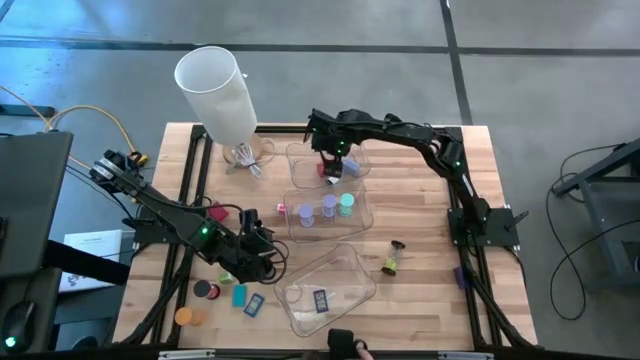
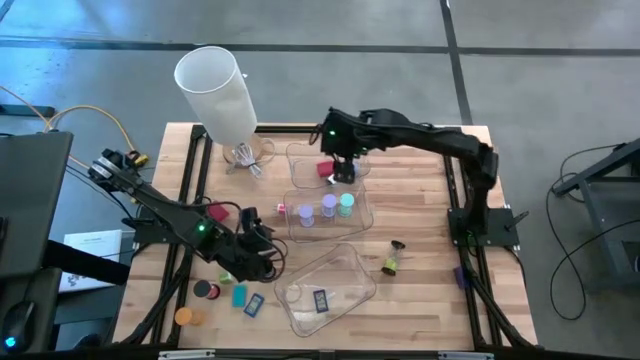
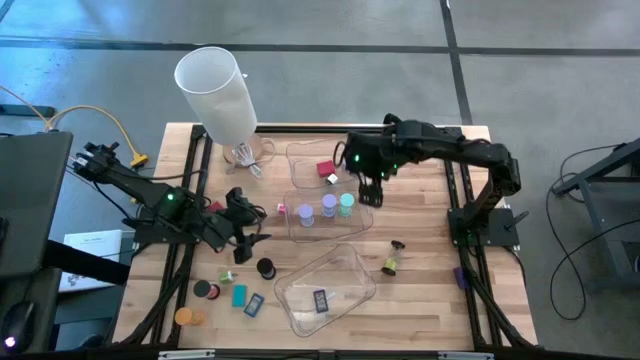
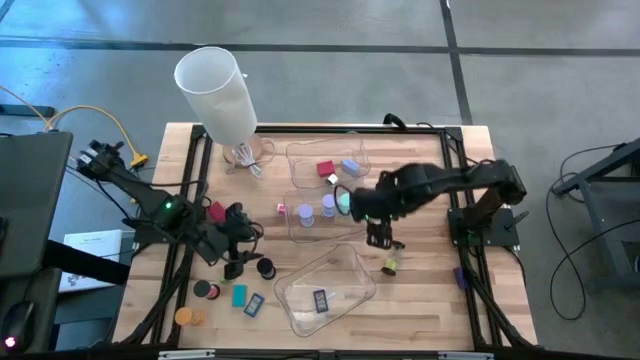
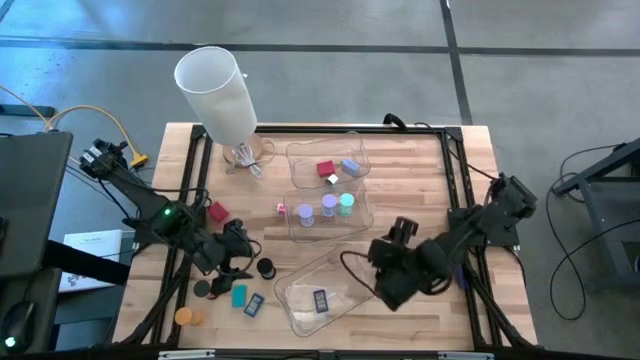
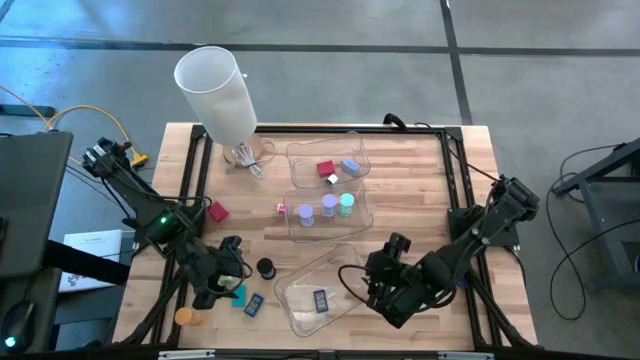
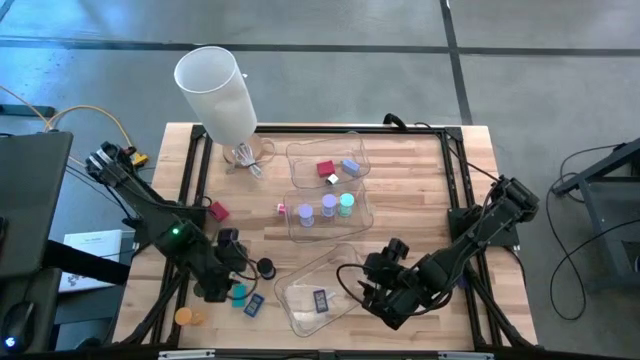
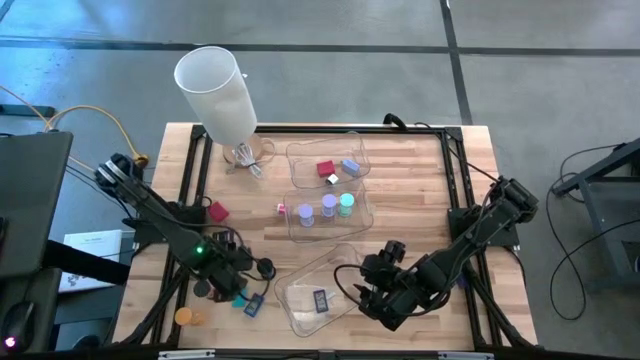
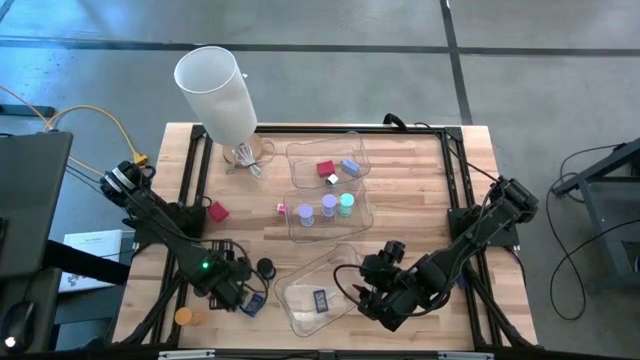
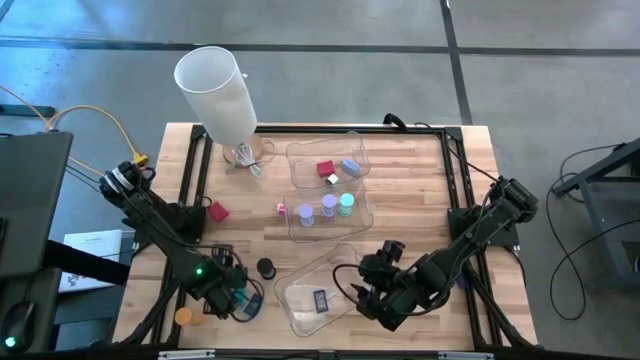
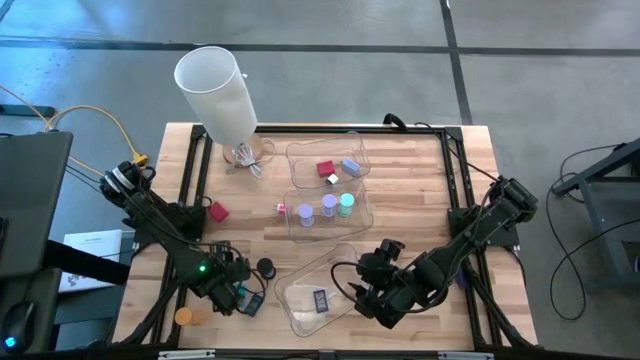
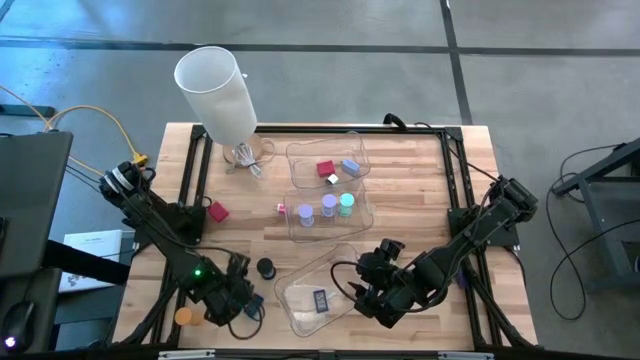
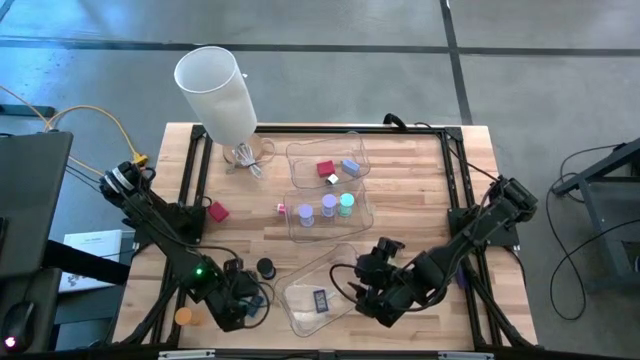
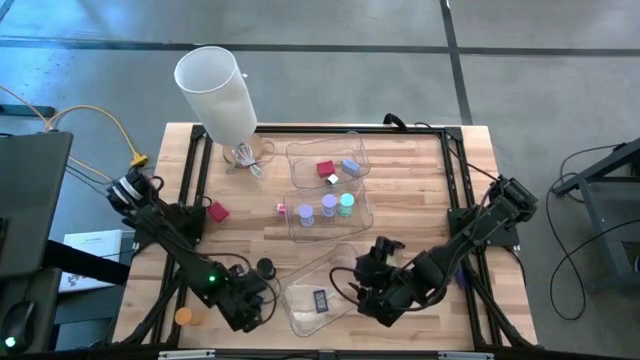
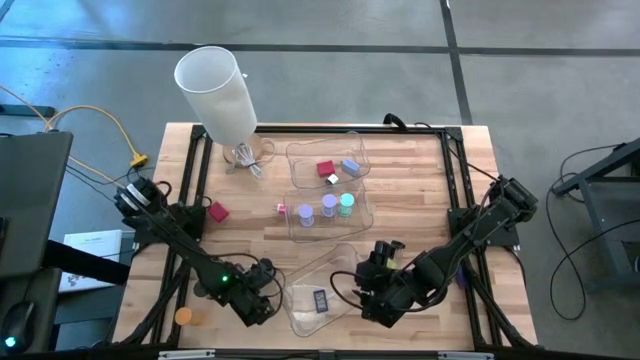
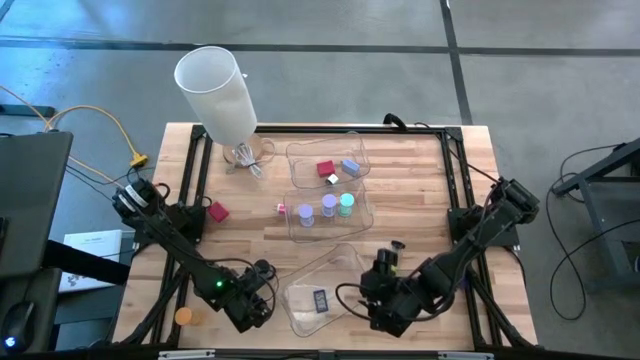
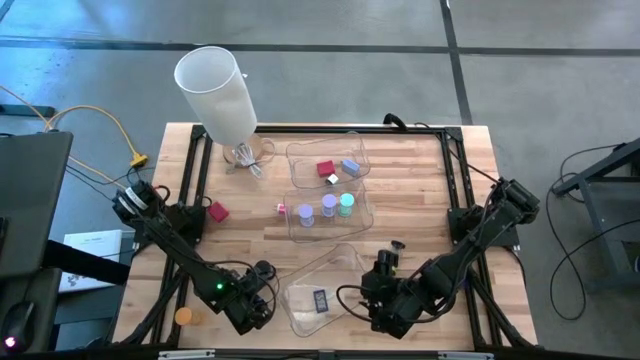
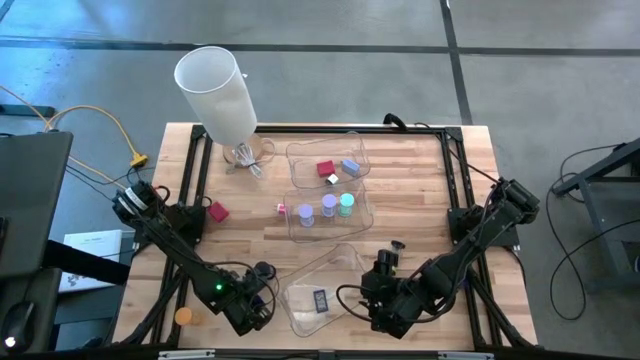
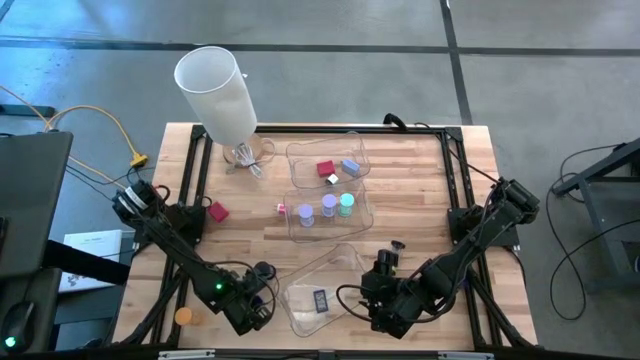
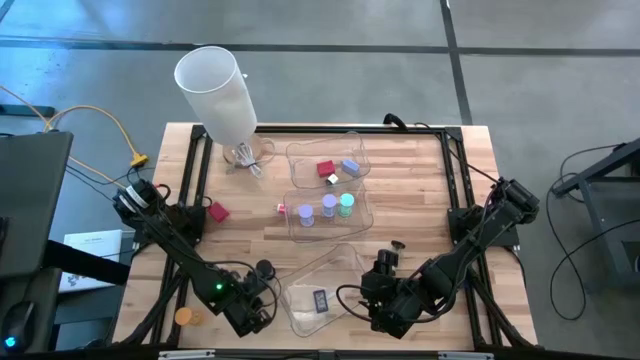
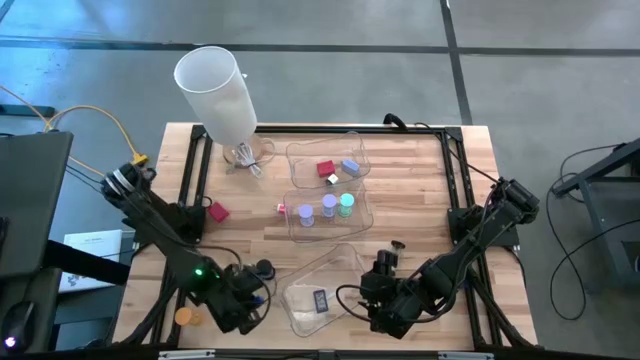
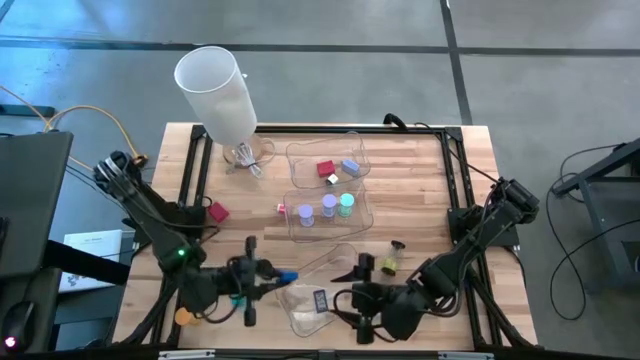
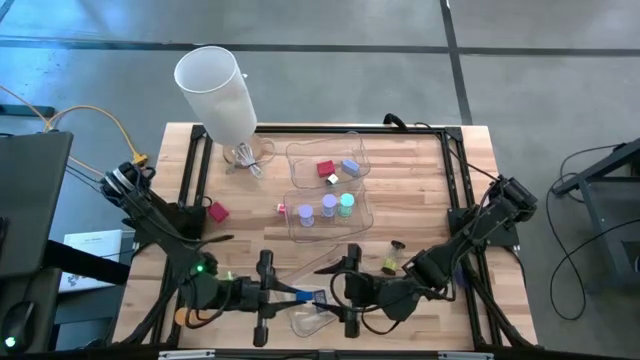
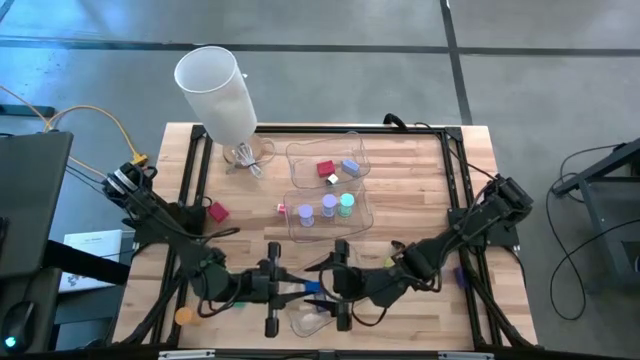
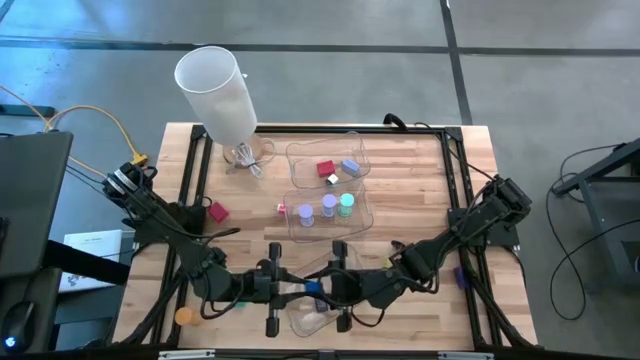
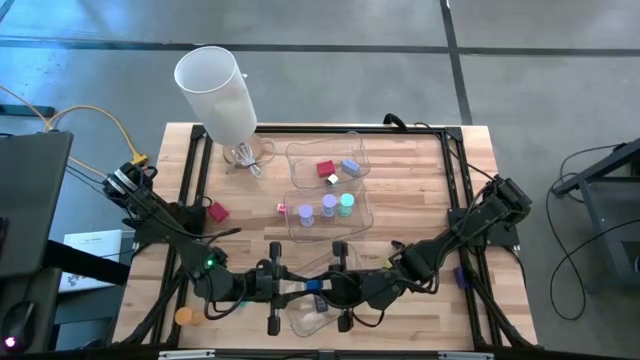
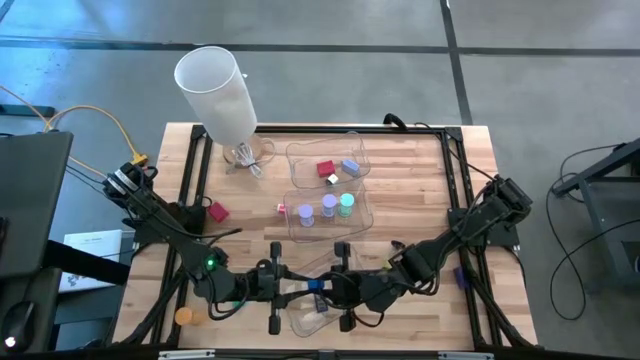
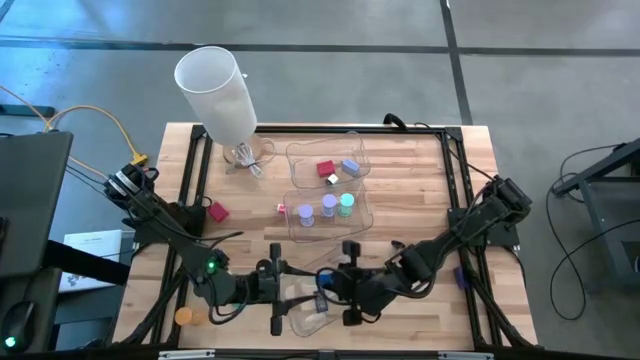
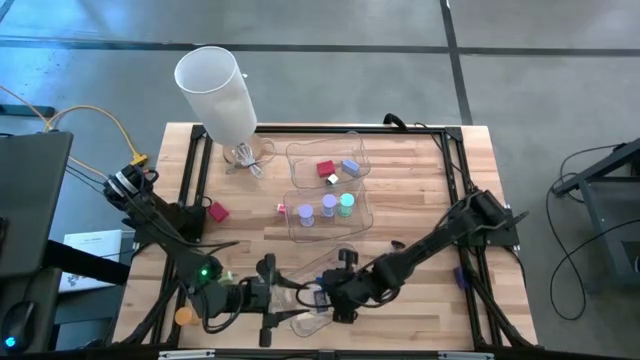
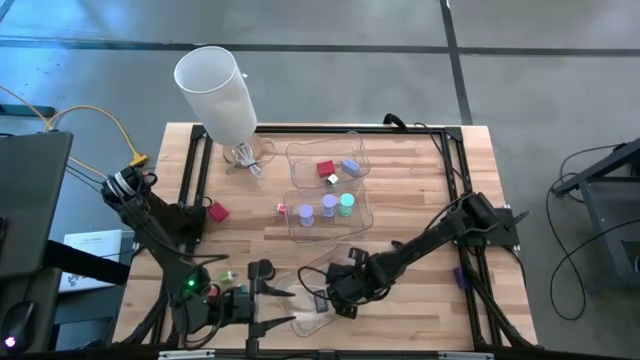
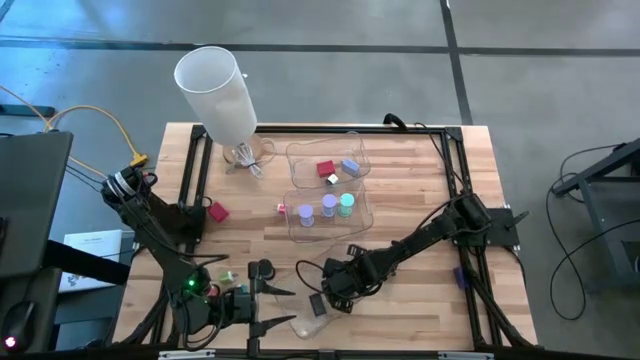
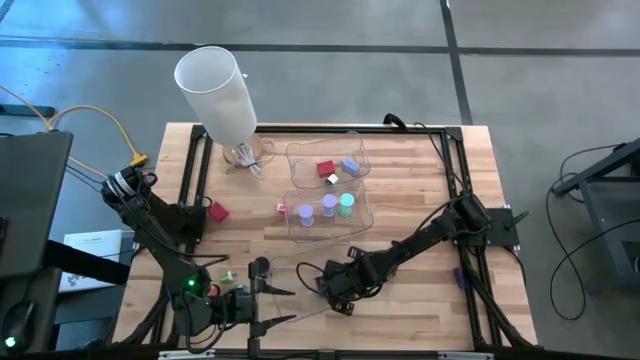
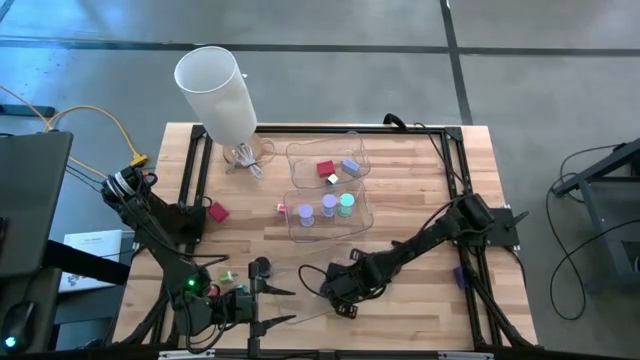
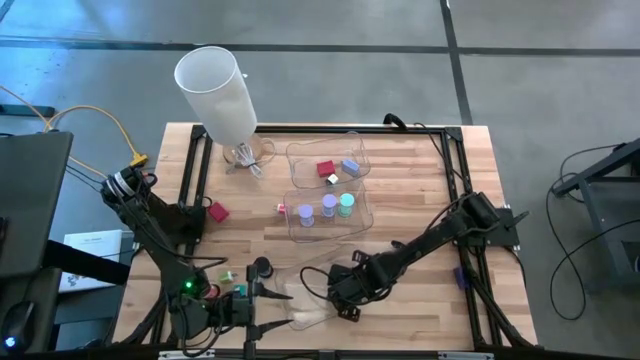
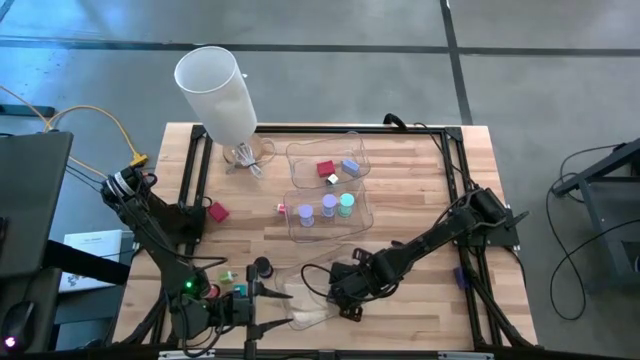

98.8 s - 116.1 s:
Task: Pick & Place Office items
Put the bottom left dark blue digital clock into the bottom transparent bin

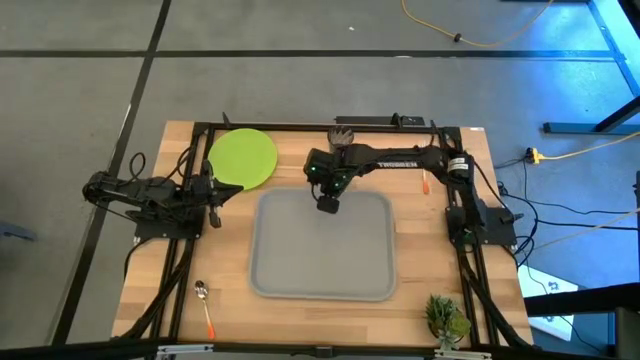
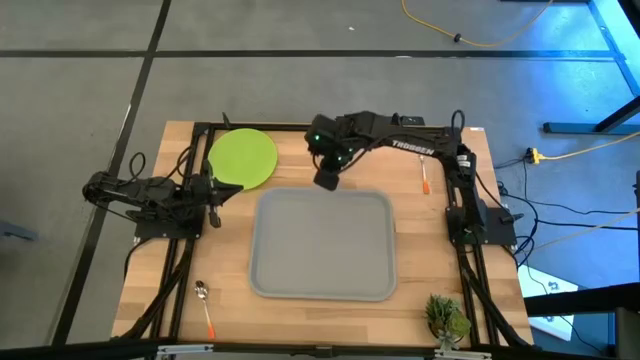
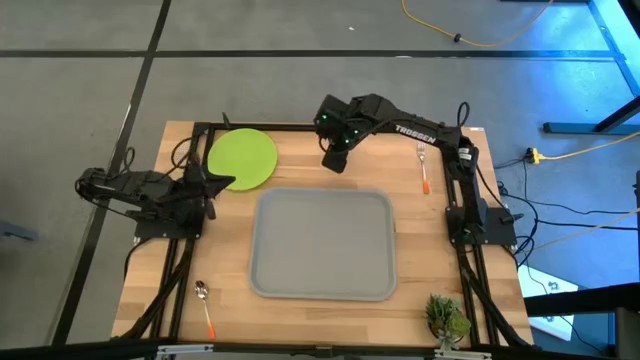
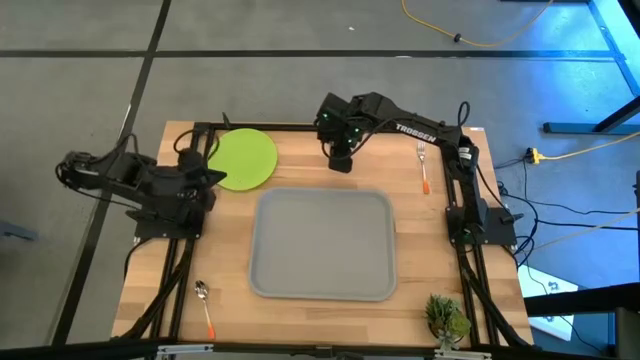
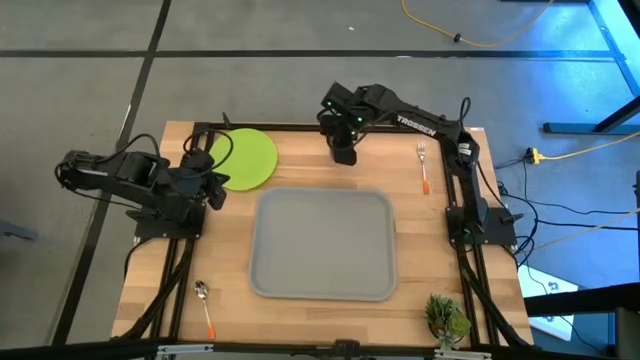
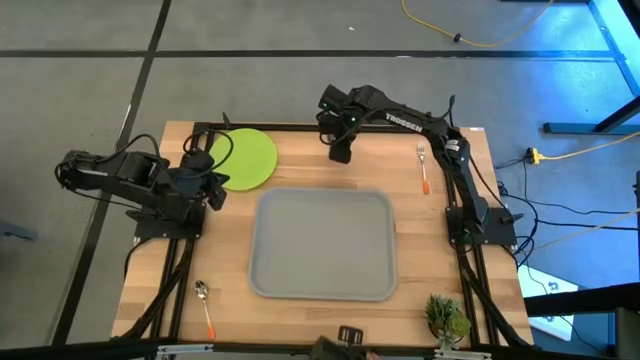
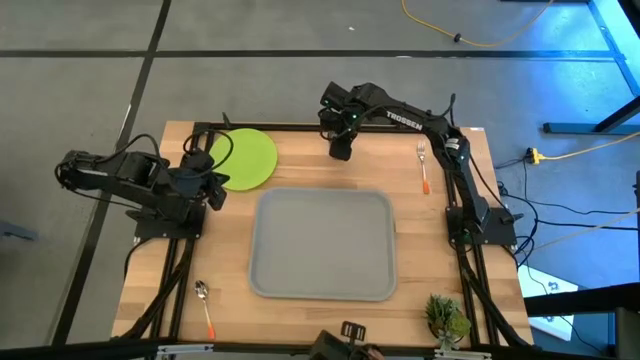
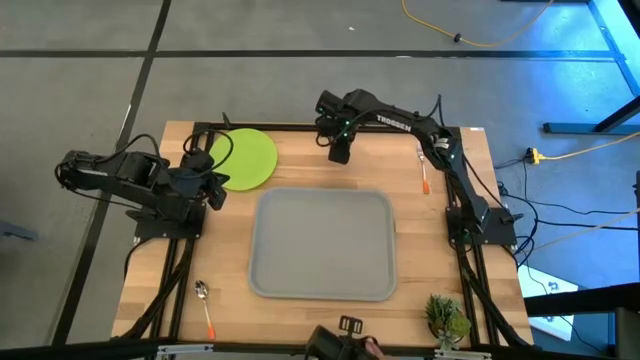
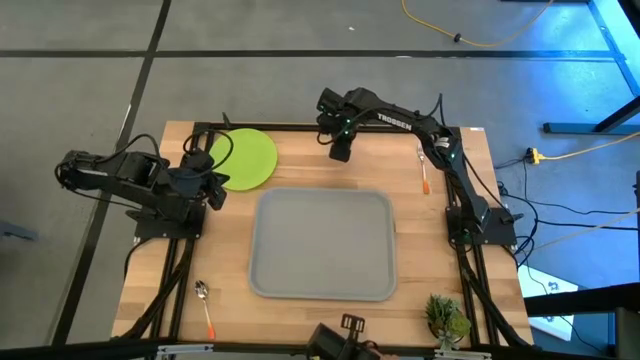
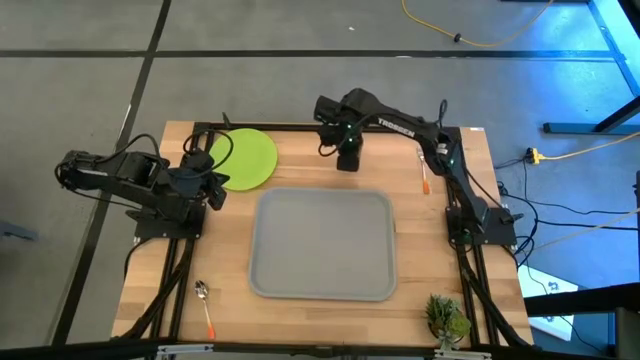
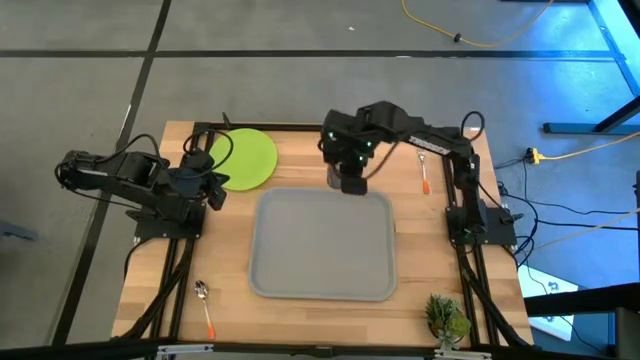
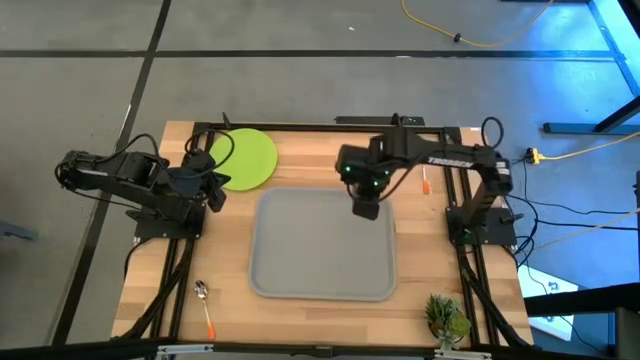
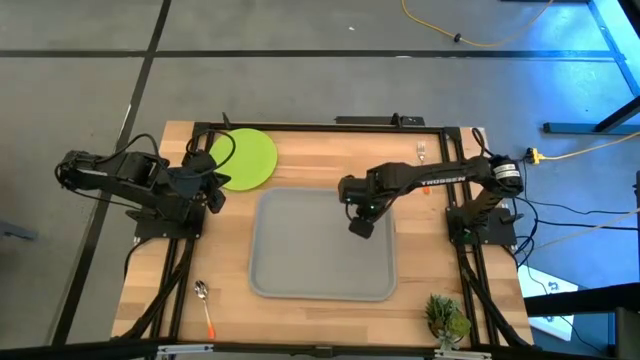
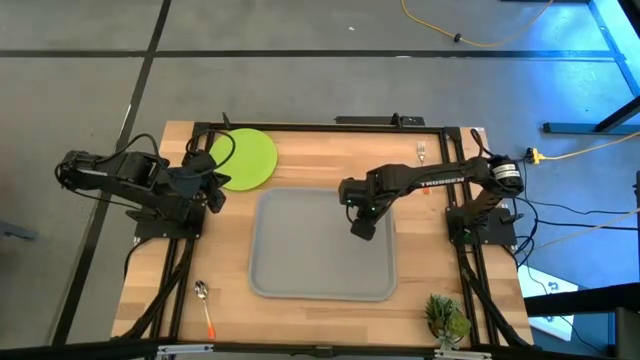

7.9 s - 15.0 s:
Task: Pick and place plate/cup/fork/spoon on tray
Put the black cup on the gray tray
